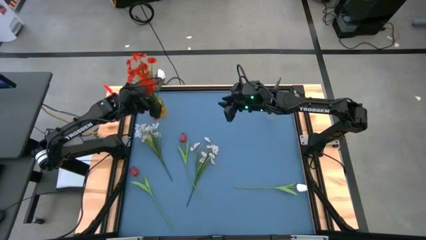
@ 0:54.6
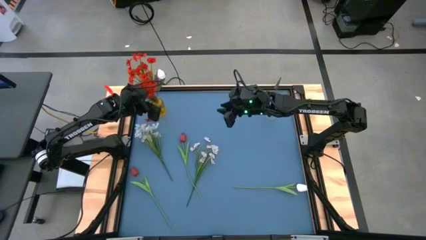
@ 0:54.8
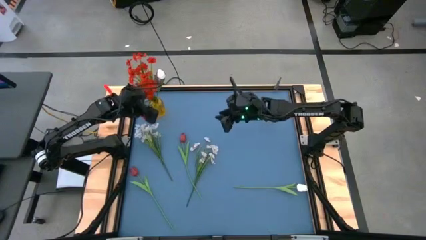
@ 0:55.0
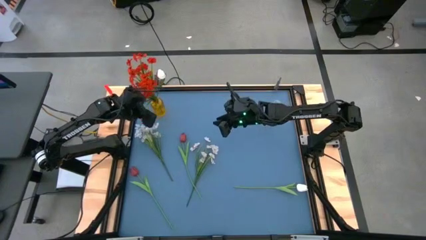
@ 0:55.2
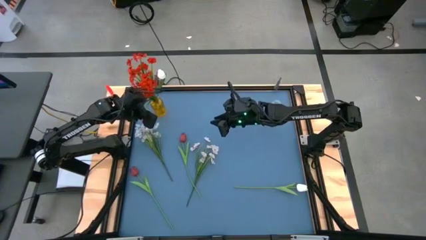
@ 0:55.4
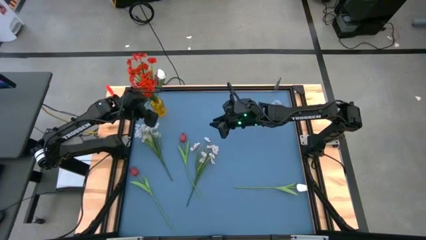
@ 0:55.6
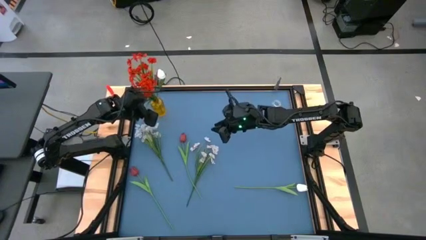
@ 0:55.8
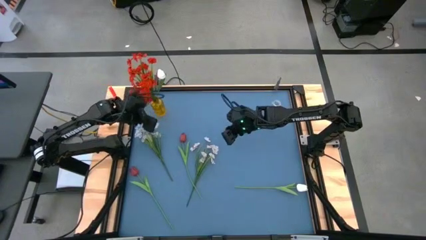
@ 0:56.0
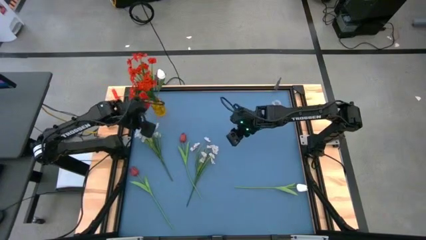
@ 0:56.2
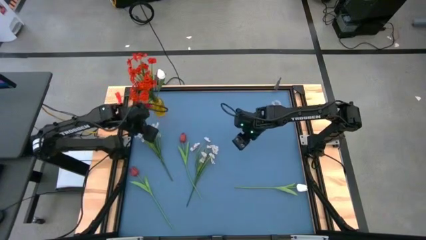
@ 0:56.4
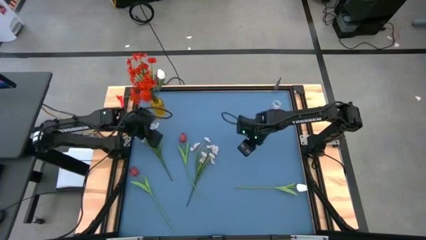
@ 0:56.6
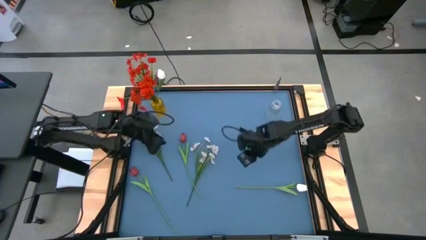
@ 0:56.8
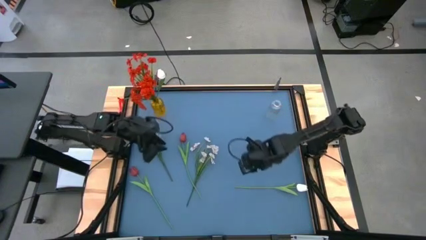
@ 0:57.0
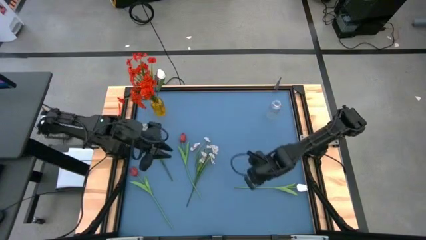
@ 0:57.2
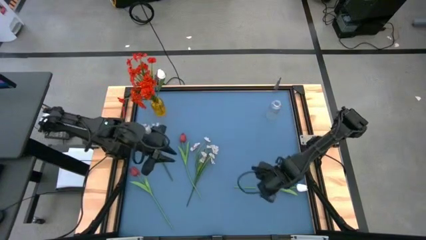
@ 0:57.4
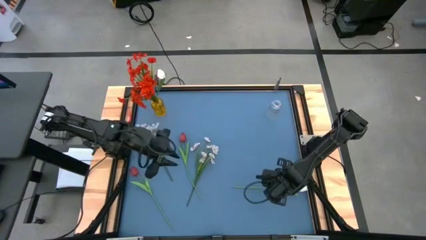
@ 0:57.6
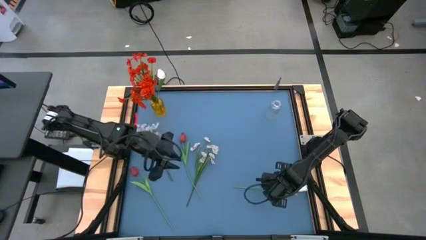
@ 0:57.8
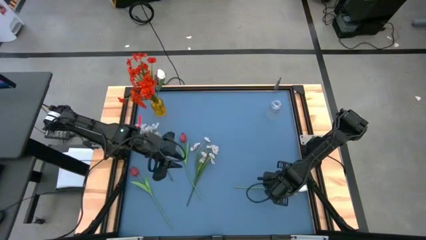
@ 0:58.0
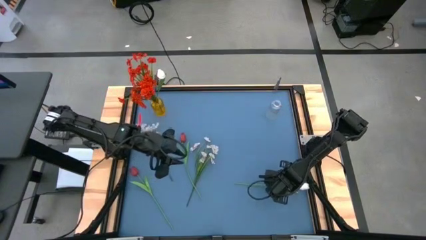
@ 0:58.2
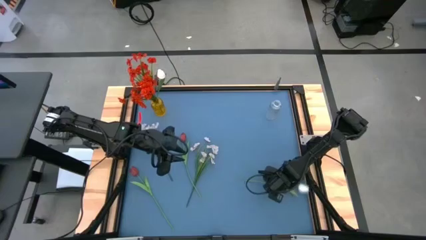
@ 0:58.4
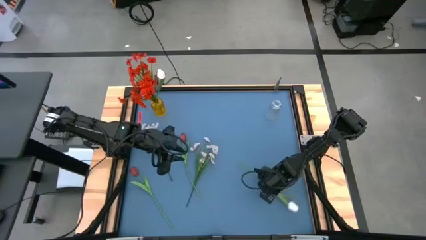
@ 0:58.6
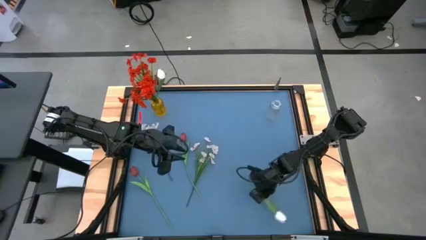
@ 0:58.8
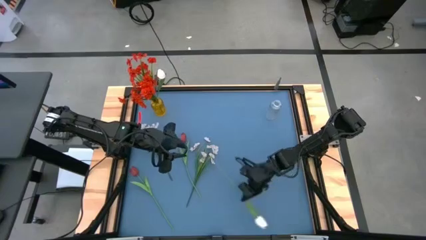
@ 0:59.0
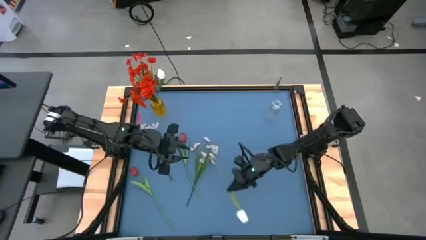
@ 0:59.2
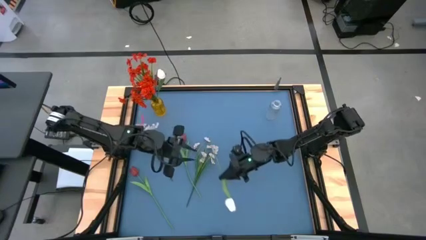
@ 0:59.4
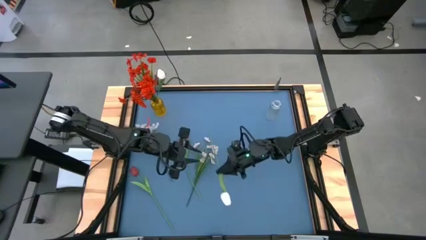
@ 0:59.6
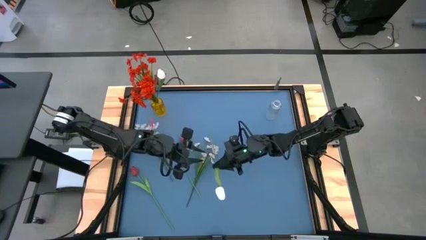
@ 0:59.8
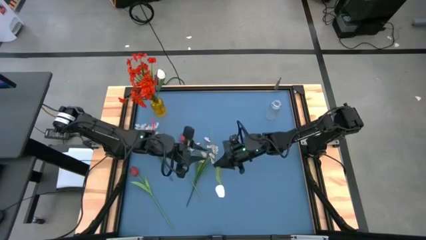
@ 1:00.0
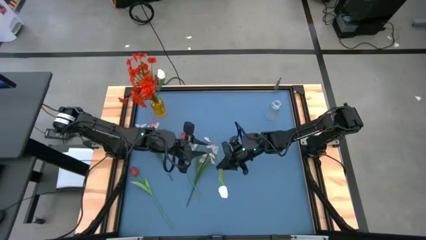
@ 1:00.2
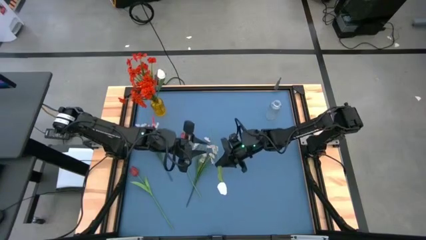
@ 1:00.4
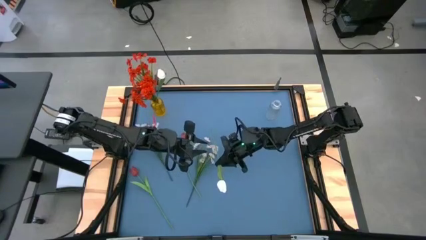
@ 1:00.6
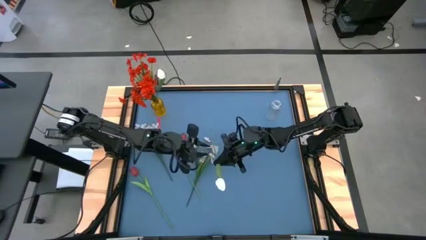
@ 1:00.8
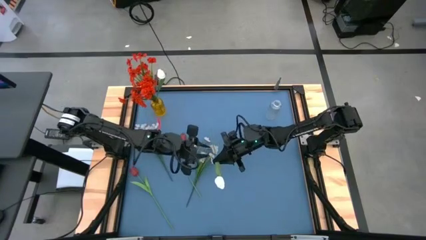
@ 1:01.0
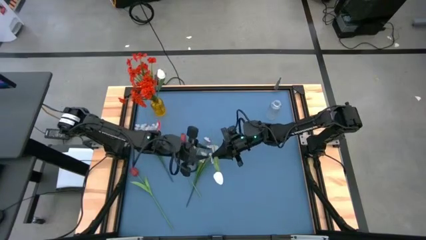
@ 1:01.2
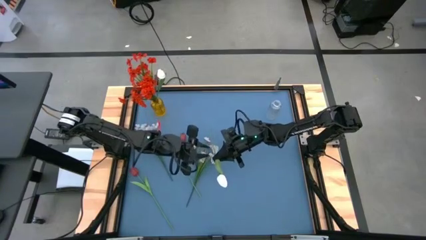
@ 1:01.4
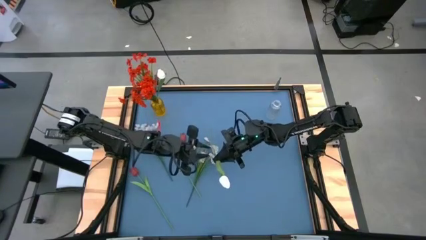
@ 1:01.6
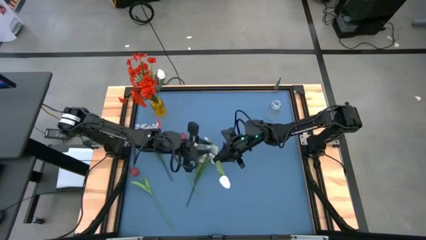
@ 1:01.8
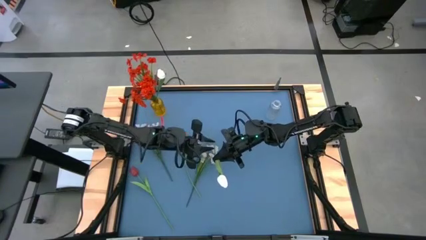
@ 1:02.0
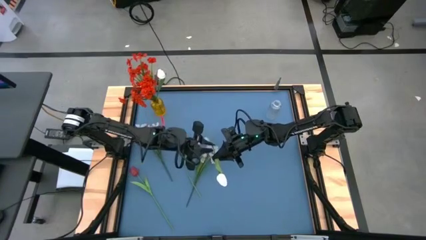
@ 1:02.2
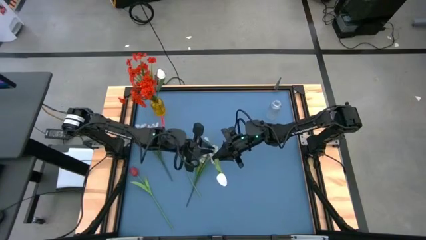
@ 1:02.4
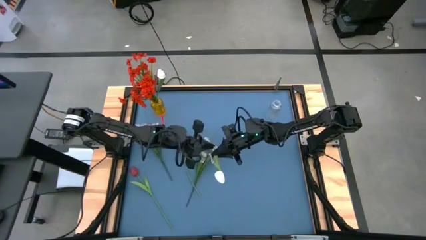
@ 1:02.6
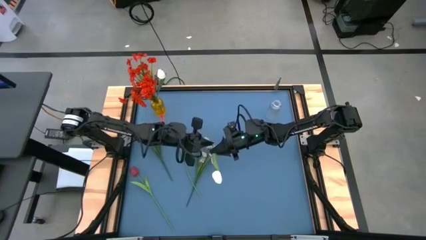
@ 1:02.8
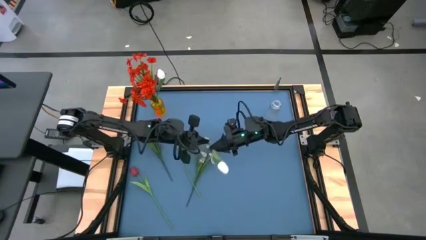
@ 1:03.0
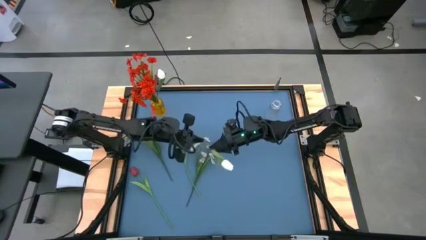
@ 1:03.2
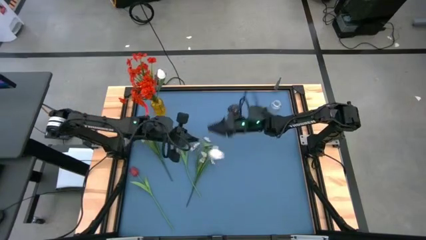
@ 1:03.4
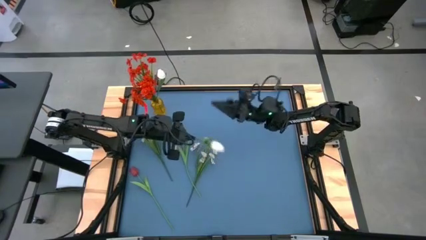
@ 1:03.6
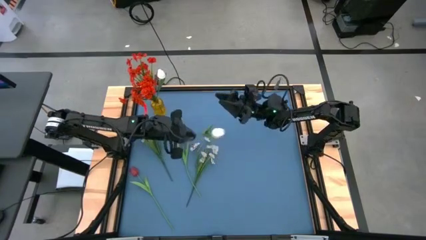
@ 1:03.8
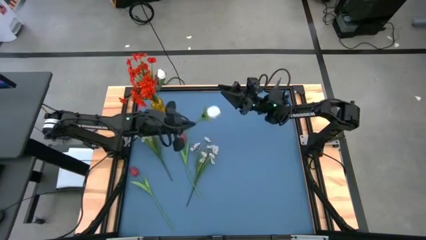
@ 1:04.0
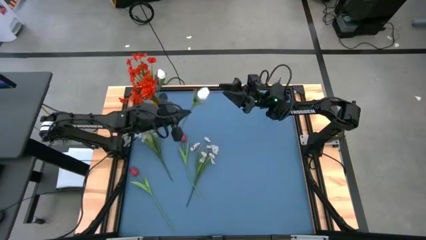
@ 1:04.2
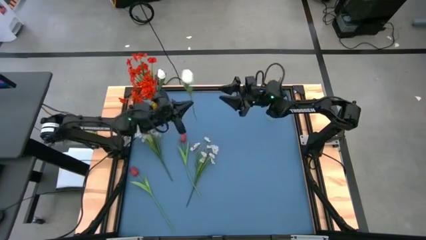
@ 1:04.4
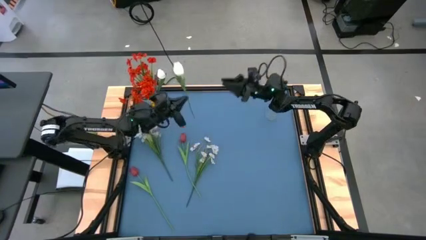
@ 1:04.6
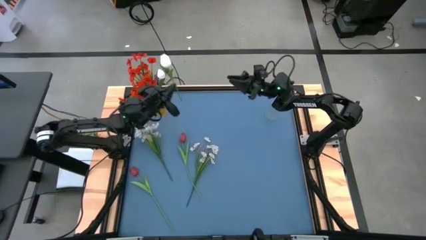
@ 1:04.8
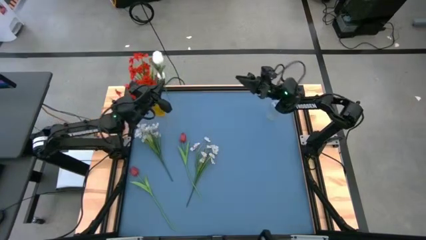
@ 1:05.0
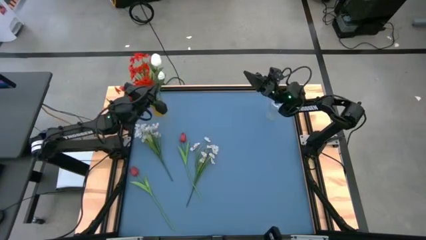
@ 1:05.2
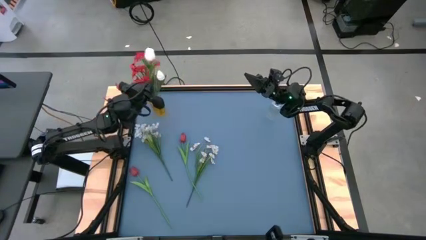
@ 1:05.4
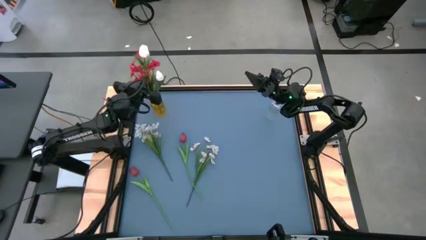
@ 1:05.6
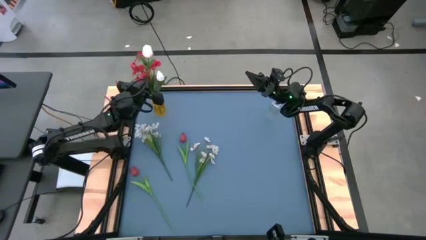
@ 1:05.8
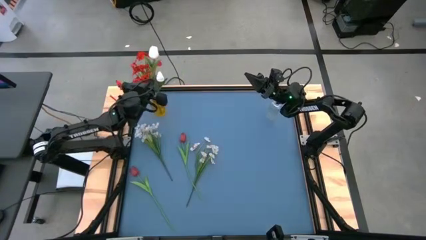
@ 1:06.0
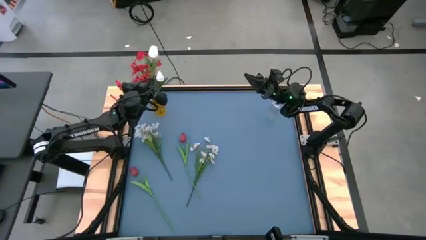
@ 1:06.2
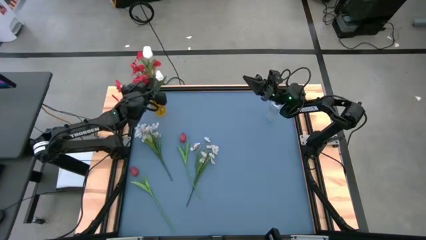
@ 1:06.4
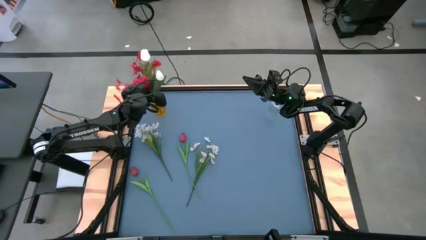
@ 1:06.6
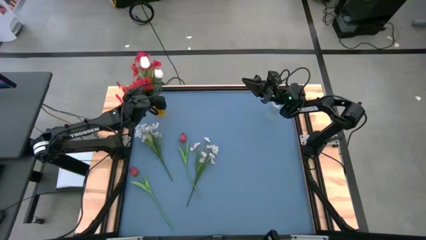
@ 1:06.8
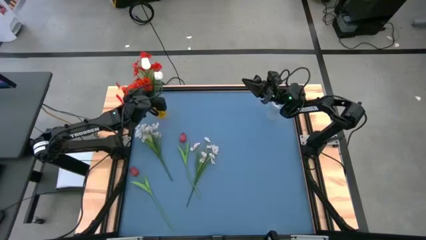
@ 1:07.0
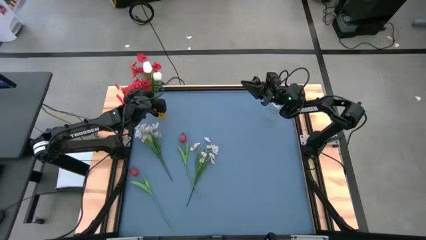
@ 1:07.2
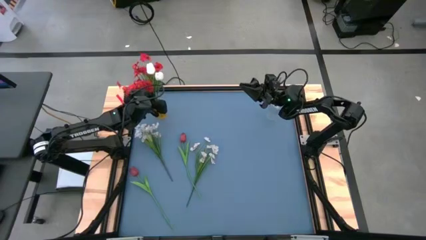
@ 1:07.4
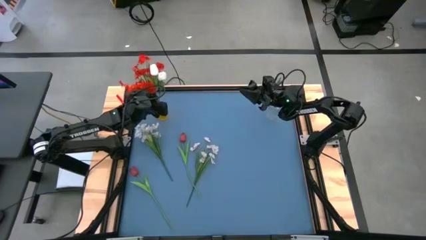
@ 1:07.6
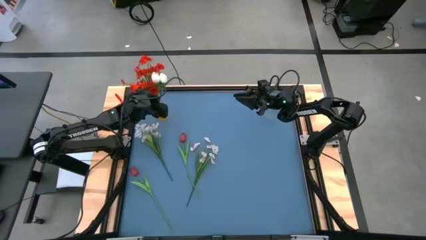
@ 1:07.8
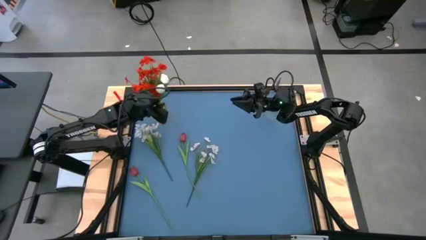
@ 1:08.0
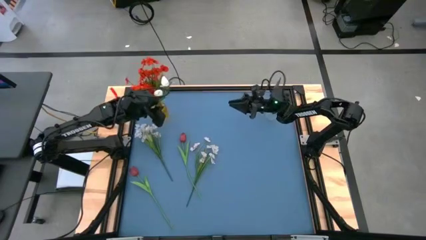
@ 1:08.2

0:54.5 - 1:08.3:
Task: Sort flowers into vase by color
Put the white flowers into the yellow transparent flower vase

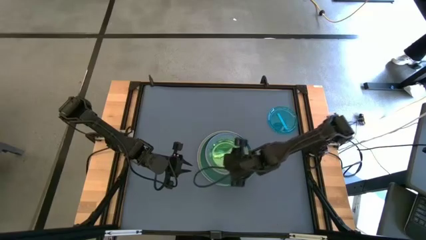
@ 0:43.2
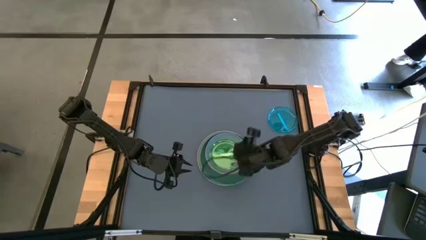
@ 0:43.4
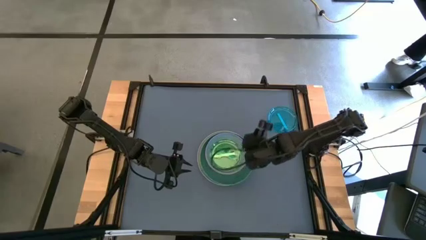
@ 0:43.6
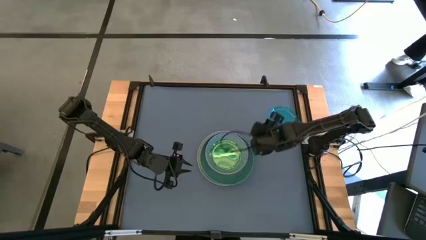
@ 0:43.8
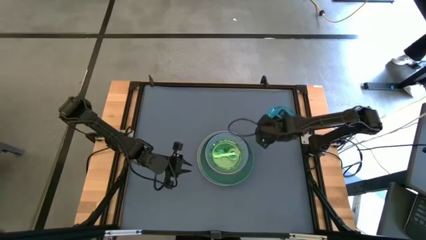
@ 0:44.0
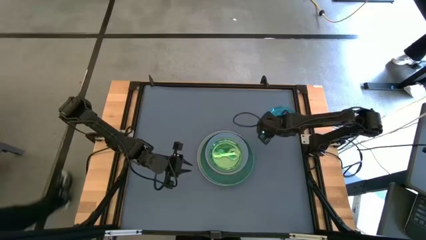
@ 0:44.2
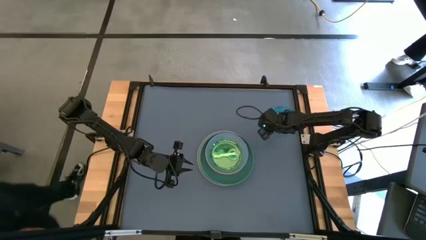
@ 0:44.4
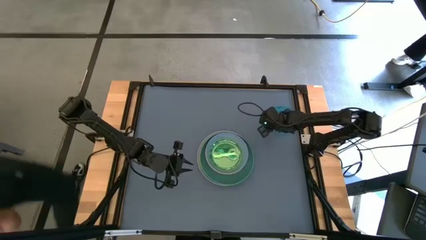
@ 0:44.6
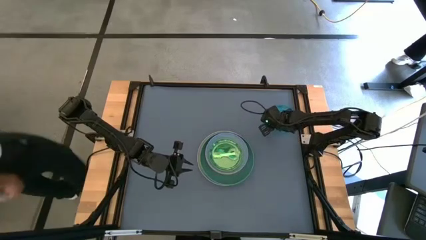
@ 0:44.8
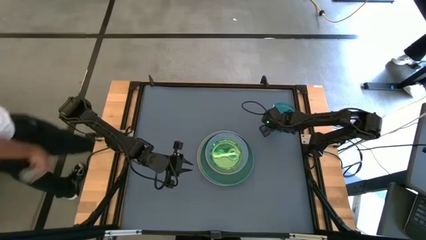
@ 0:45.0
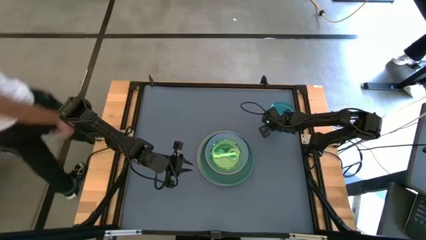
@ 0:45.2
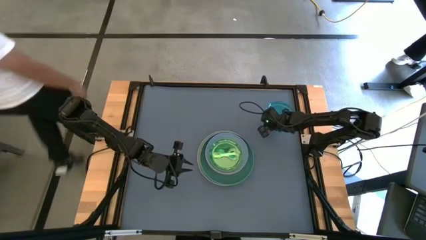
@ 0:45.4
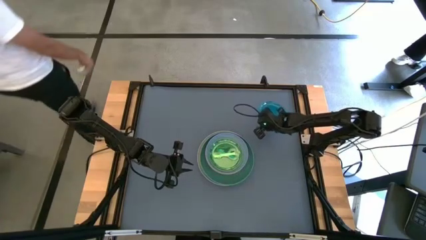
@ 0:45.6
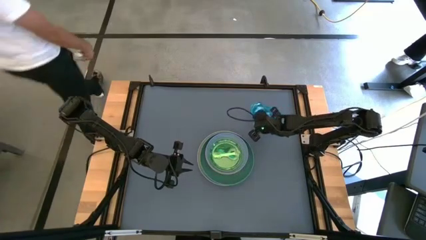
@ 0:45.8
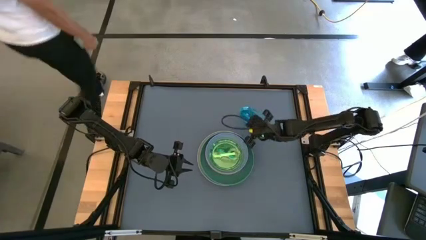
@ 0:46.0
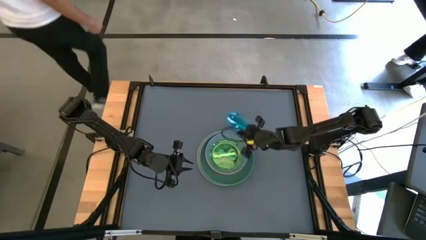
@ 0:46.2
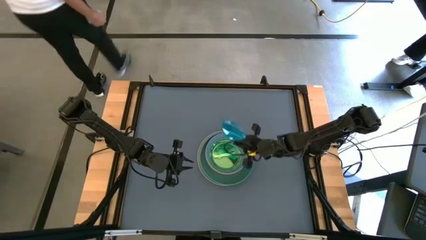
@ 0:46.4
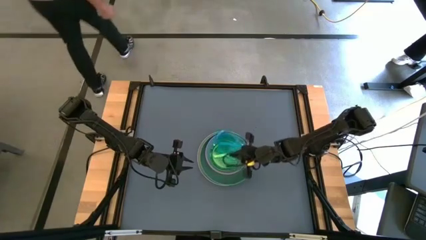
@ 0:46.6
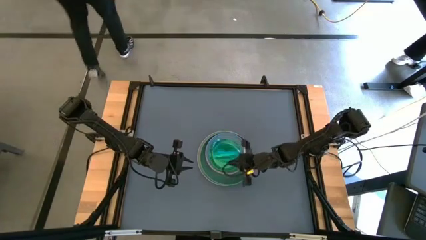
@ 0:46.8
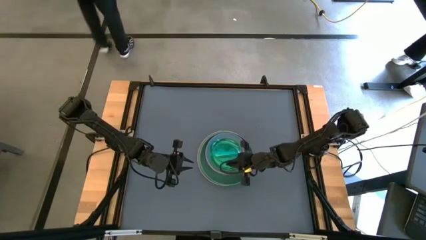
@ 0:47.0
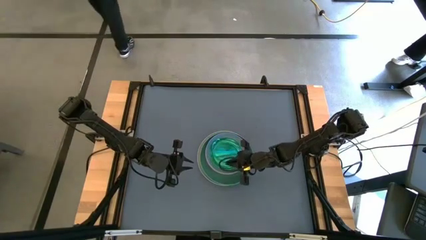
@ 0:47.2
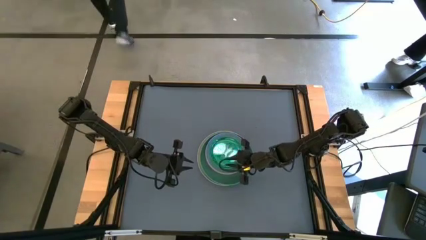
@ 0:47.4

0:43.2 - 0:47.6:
Task: Stack plastic plates
Stack the light blue plate on top of the light green plate
